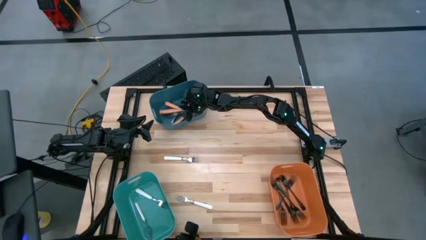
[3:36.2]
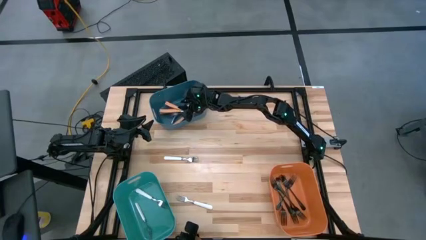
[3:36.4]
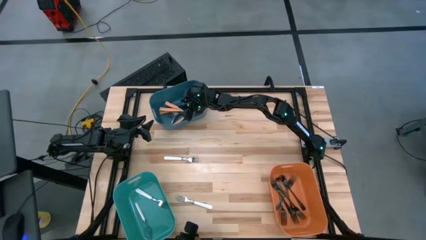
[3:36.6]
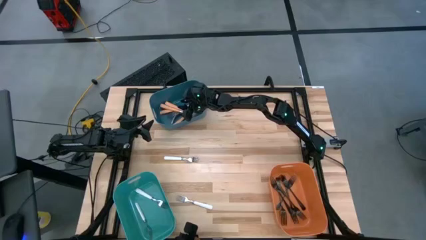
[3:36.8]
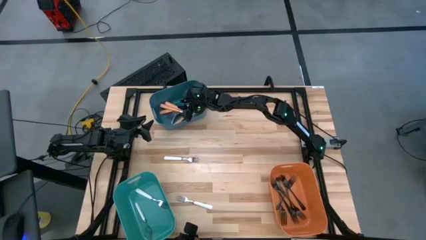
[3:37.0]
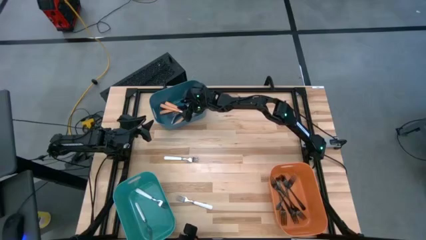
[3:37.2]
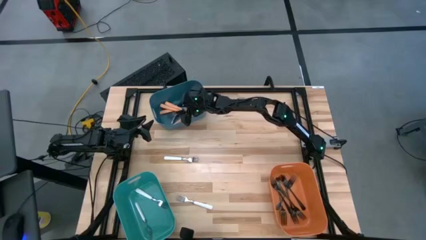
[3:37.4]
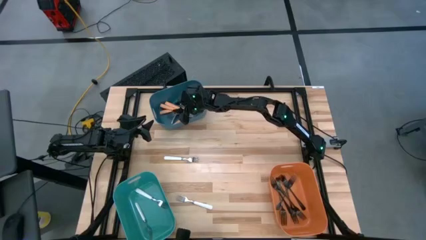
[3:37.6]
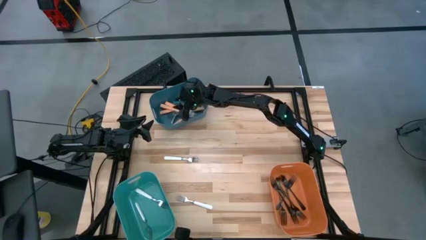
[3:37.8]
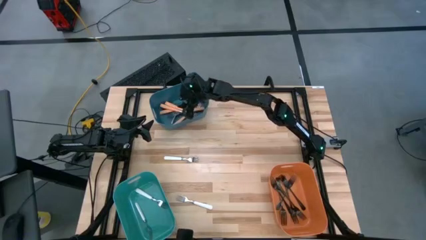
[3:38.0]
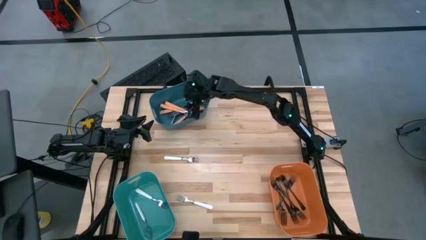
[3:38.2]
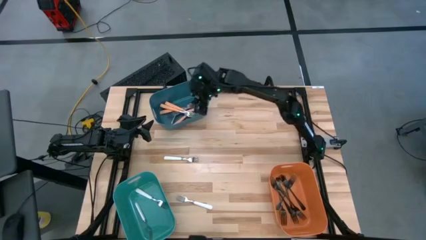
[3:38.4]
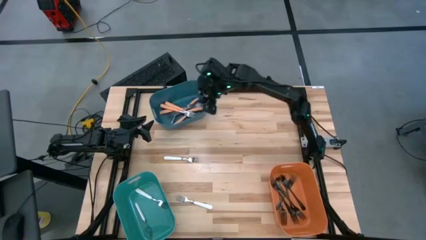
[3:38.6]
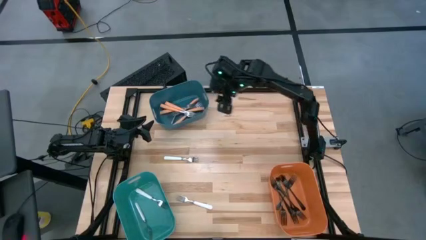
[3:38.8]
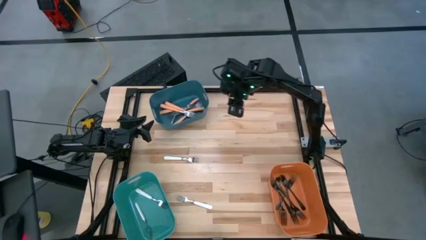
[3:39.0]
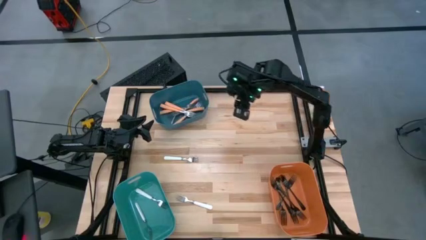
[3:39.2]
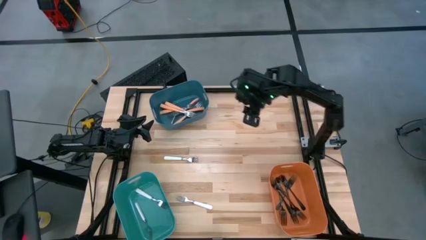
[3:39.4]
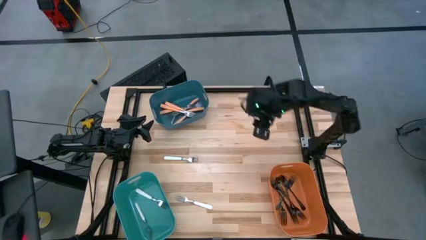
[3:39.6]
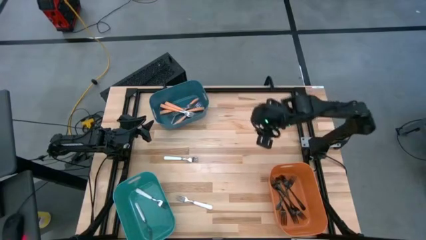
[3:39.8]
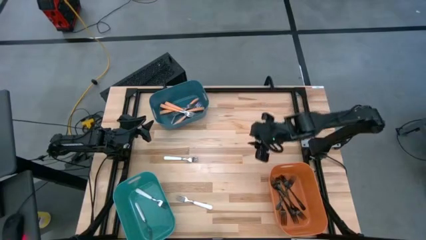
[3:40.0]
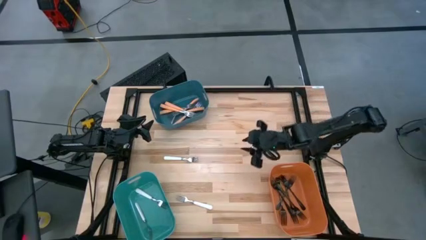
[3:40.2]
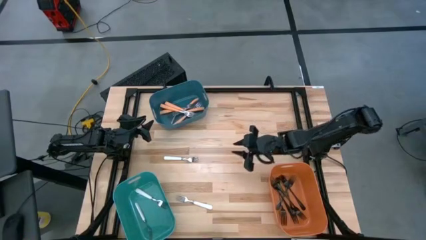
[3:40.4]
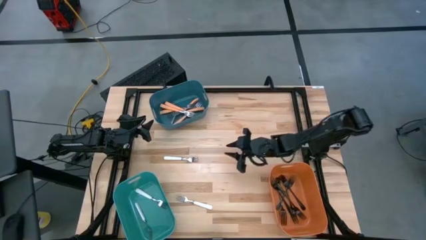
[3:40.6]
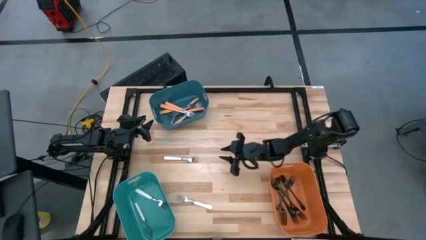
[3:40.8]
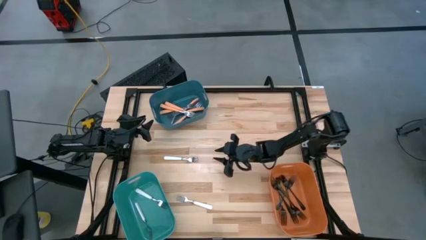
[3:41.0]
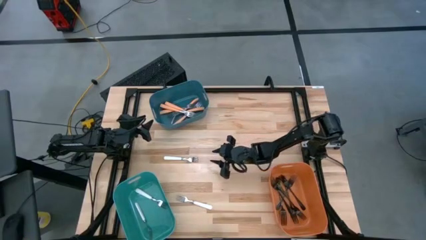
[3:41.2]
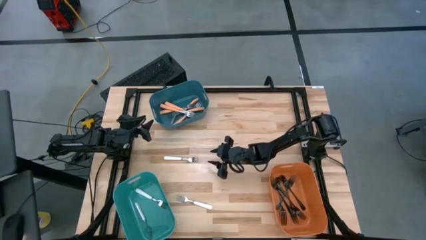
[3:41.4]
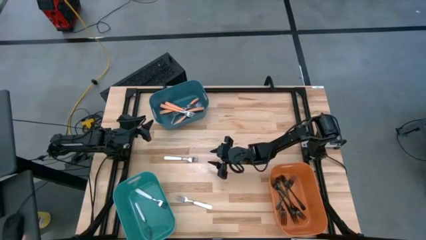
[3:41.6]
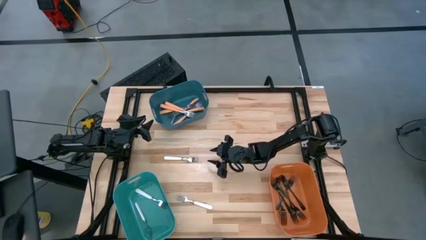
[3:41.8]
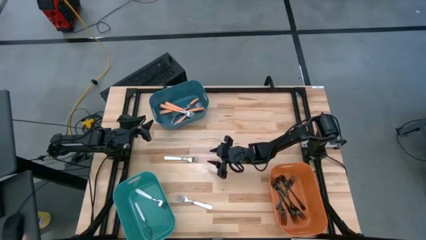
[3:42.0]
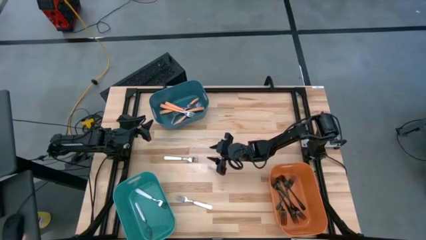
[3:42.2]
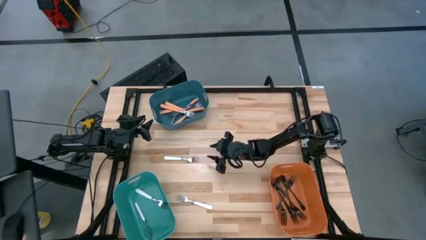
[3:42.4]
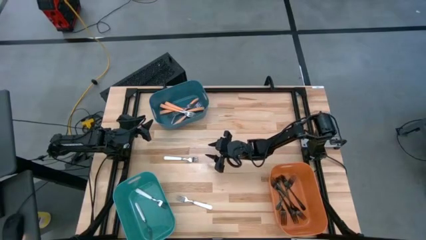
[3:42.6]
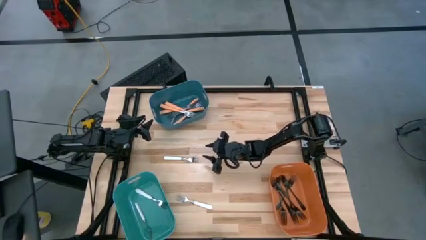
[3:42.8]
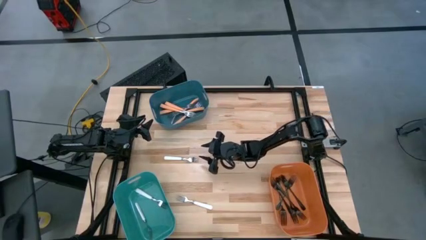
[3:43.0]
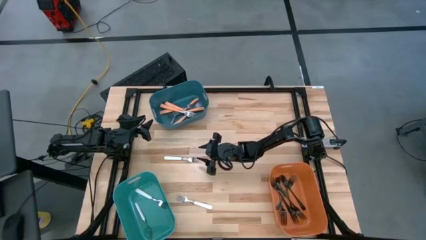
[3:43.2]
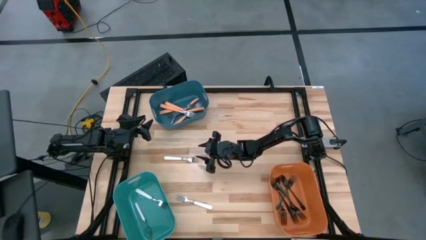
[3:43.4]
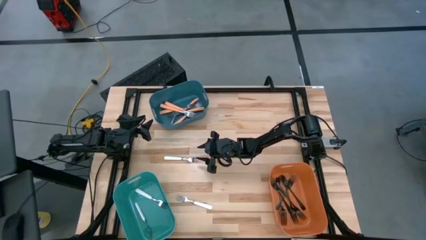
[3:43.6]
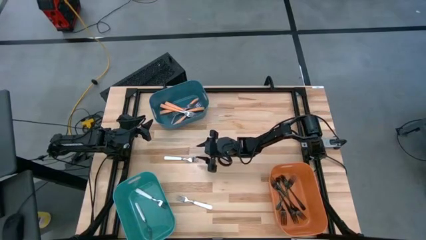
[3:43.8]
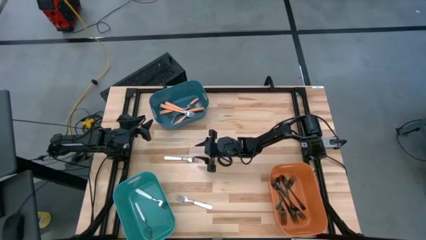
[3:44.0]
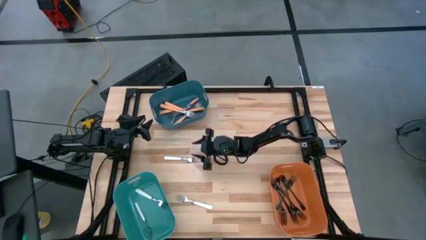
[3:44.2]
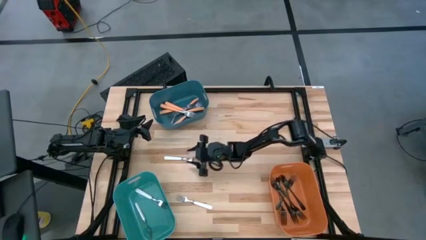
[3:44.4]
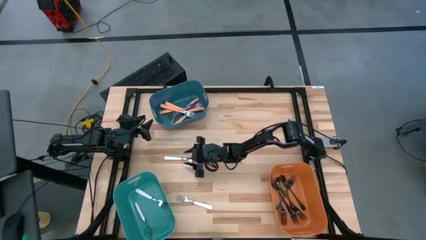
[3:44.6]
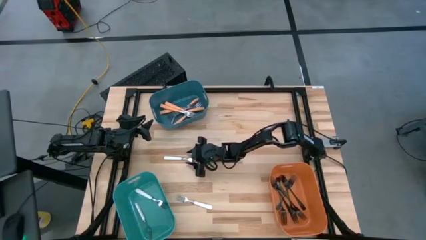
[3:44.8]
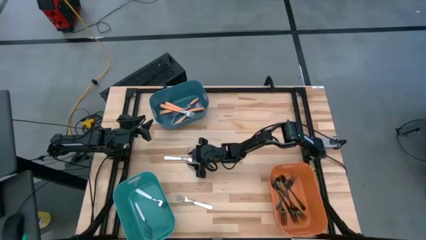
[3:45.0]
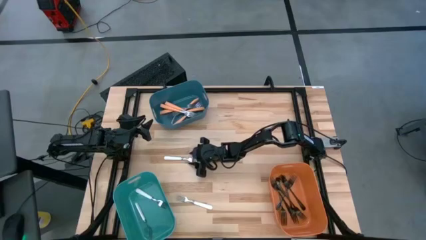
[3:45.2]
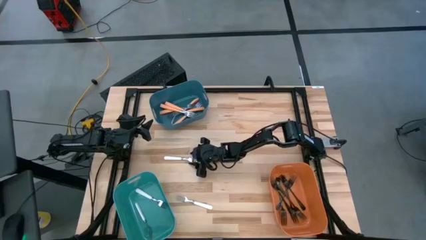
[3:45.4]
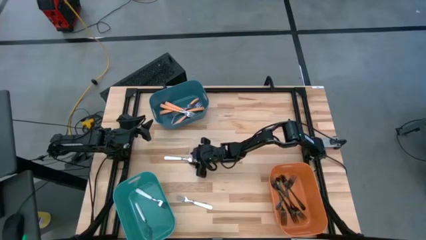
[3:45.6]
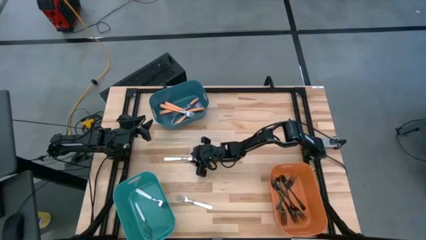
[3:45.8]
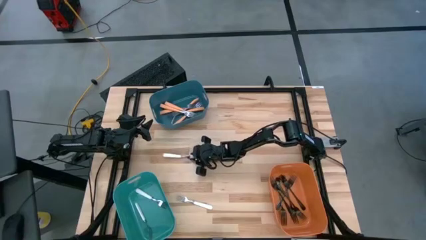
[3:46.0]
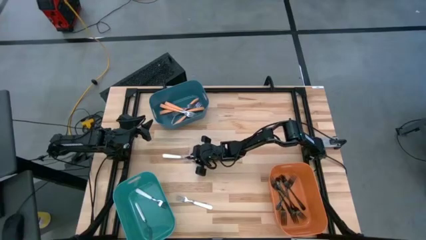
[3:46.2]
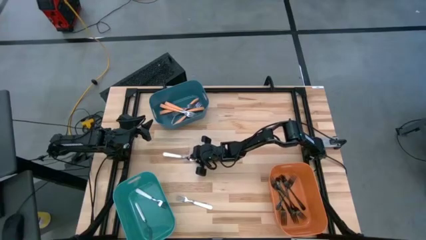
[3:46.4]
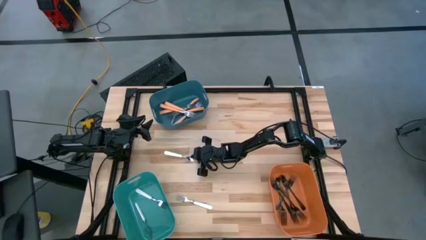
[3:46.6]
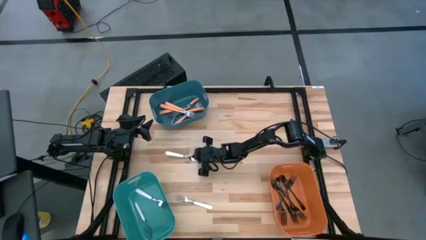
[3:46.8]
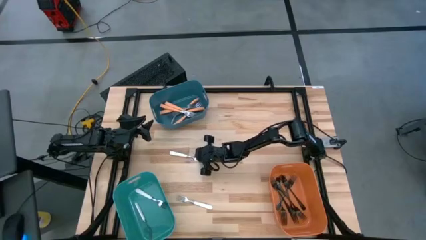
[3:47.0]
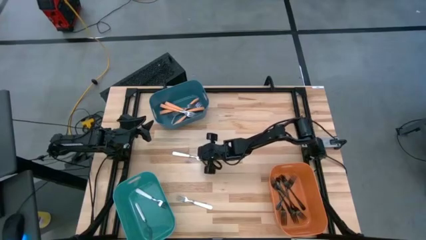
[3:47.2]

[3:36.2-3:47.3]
Task: Sort silverware by color (type)
Put the white fork into the green bin

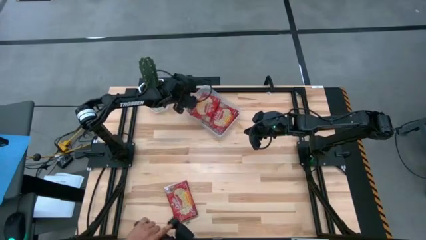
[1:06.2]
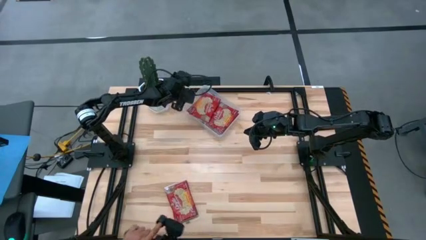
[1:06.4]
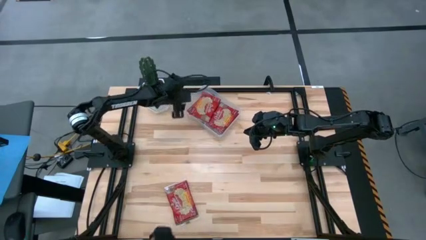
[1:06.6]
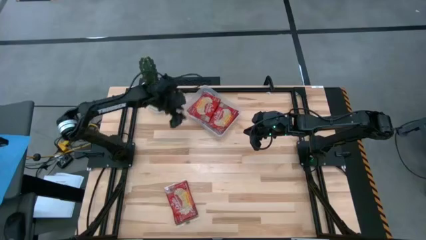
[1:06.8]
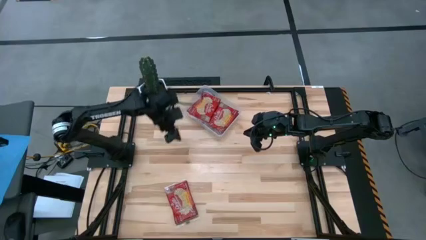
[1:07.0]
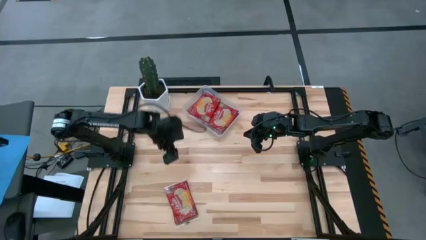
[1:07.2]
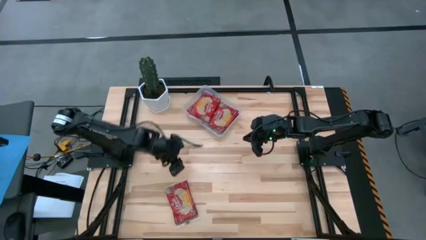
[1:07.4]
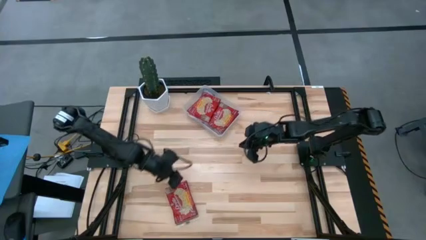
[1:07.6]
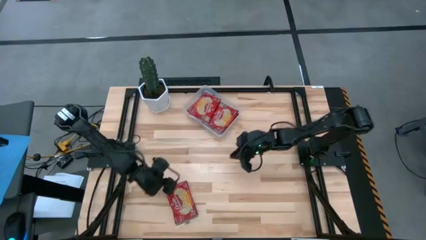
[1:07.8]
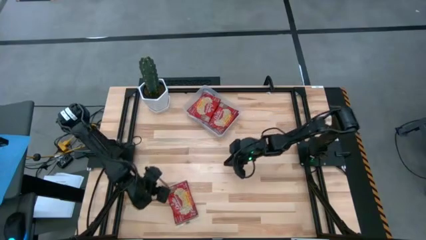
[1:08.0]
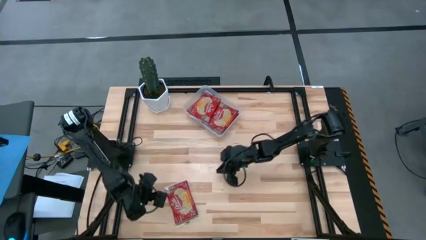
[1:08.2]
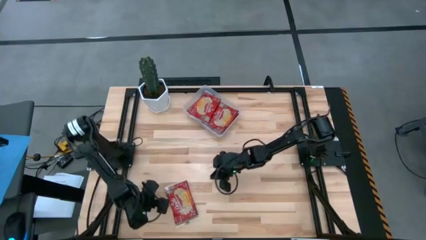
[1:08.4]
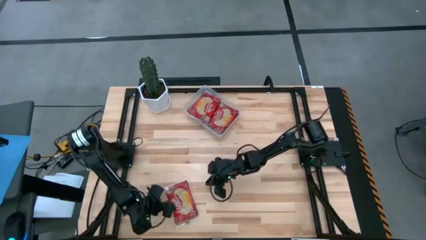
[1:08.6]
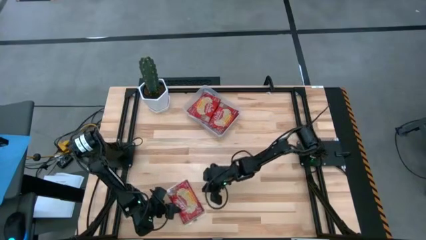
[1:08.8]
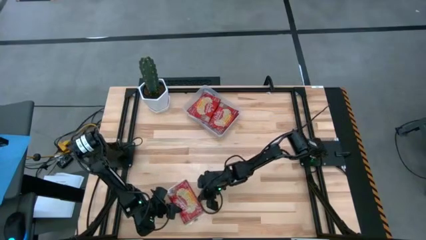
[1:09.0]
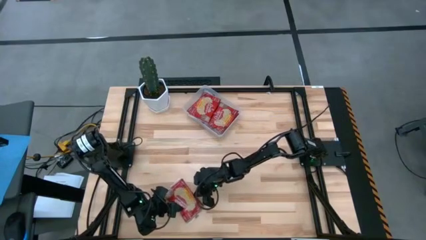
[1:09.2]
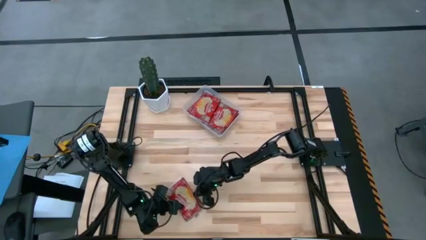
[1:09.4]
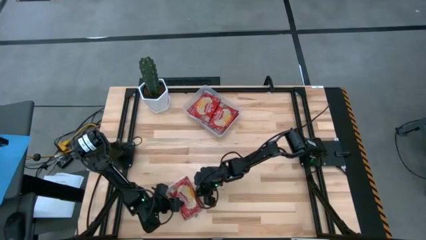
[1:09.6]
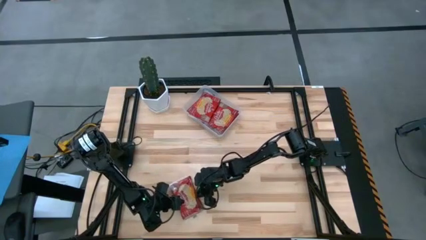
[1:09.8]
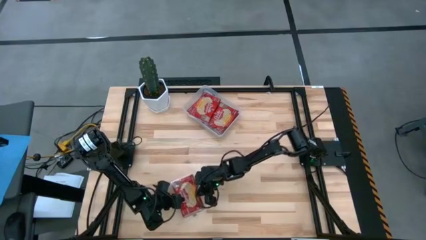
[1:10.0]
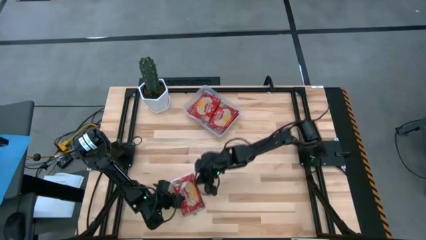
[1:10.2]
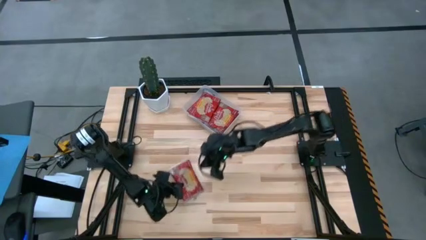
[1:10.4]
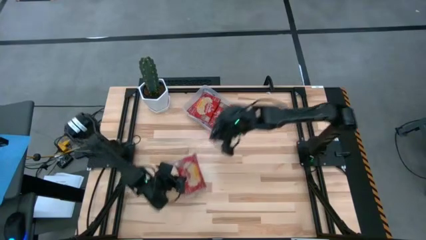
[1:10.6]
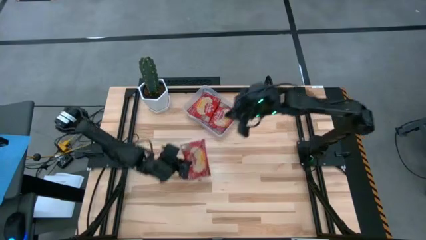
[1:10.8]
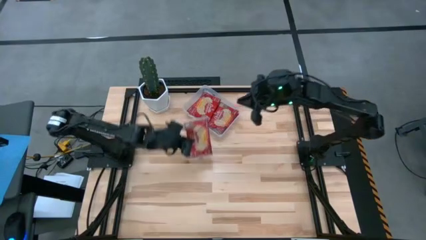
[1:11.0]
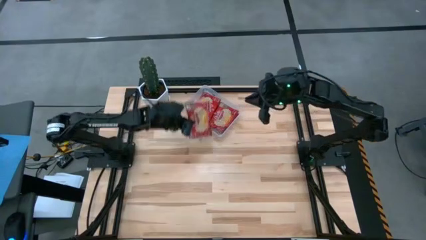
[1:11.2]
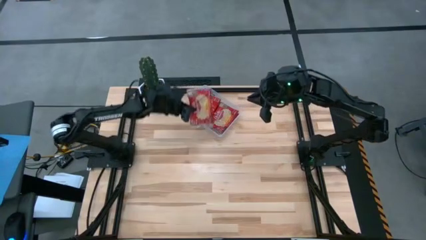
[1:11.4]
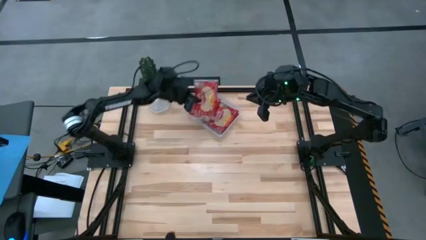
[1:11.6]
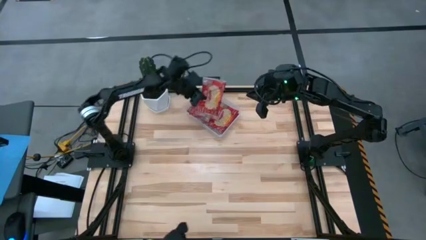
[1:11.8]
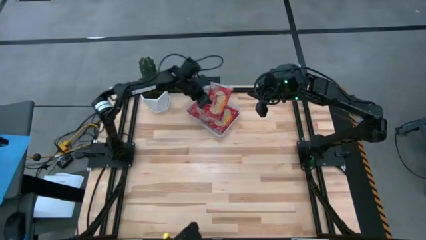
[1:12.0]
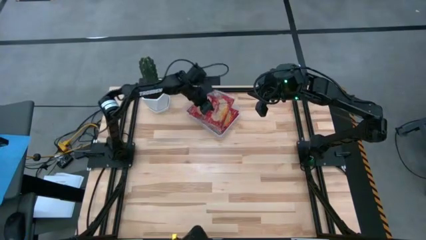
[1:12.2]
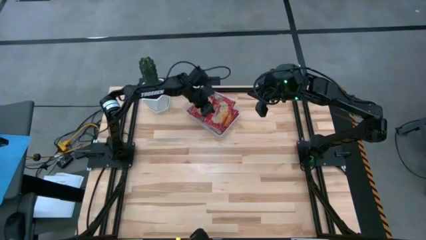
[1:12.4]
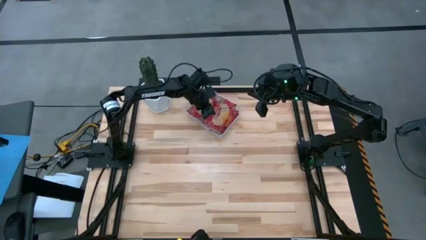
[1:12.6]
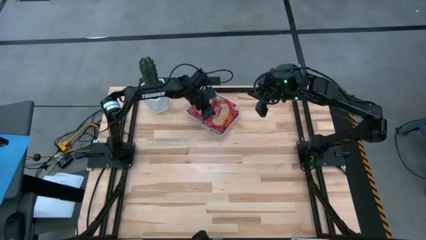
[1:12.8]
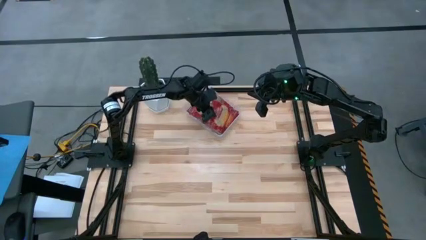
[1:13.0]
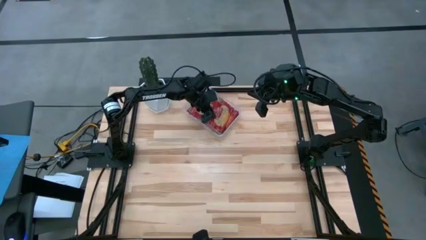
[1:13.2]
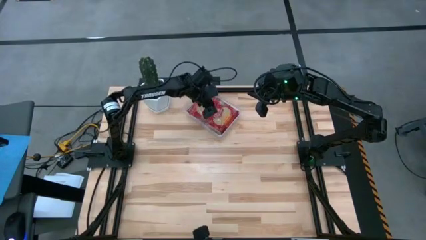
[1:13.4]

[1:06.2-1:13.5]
Task: Sort popcorn bags into baskets
Put the red popcorn bag into the transparent bin
